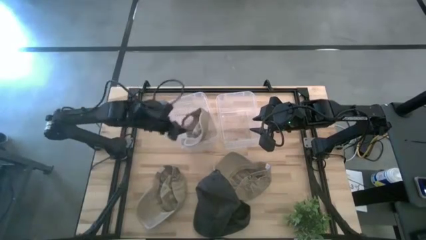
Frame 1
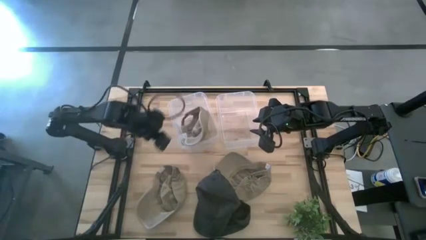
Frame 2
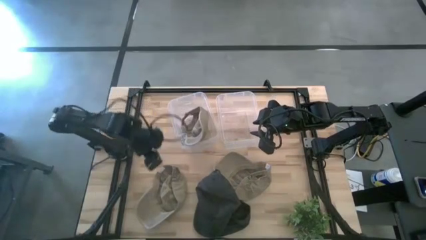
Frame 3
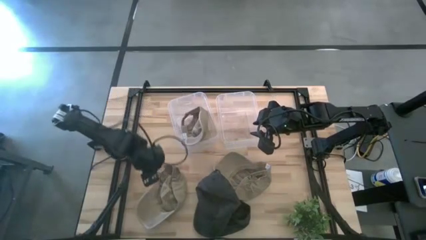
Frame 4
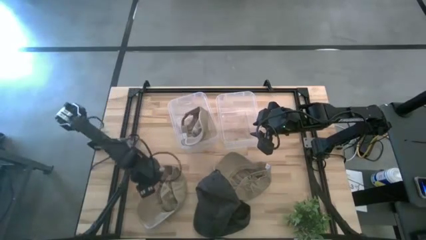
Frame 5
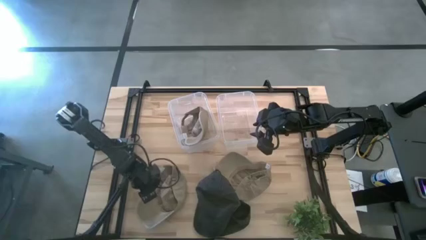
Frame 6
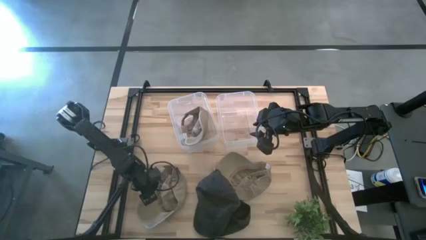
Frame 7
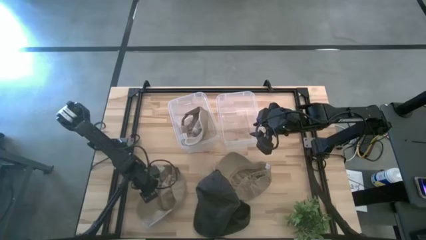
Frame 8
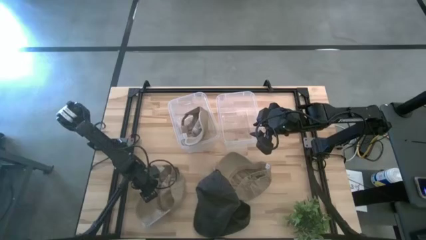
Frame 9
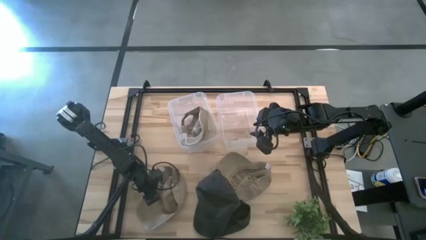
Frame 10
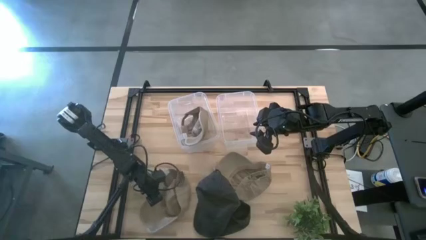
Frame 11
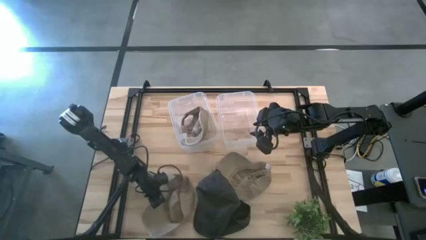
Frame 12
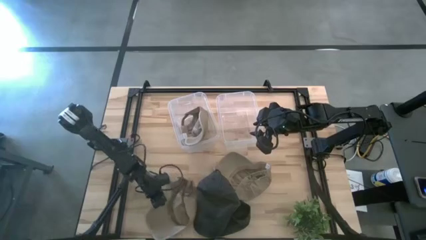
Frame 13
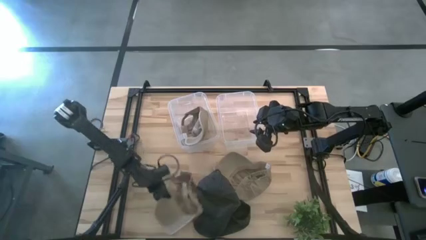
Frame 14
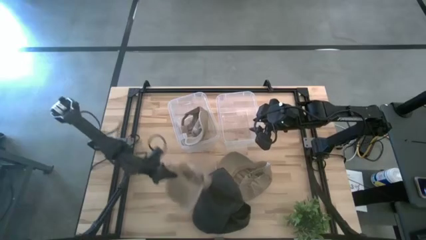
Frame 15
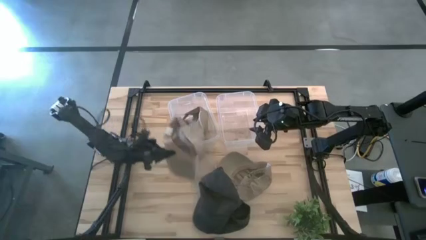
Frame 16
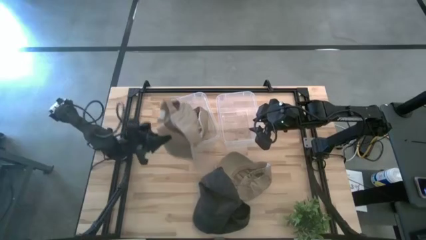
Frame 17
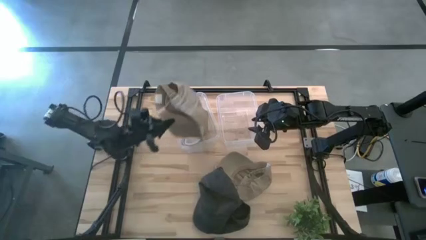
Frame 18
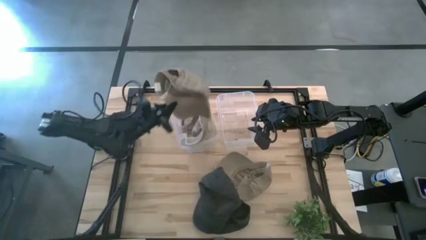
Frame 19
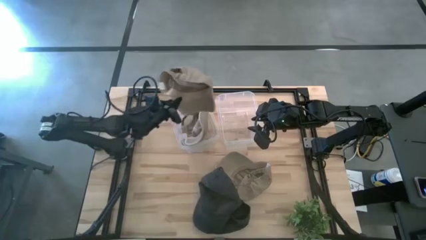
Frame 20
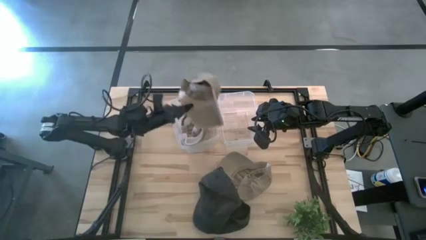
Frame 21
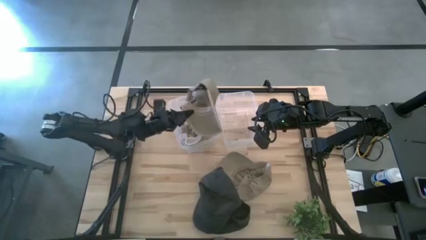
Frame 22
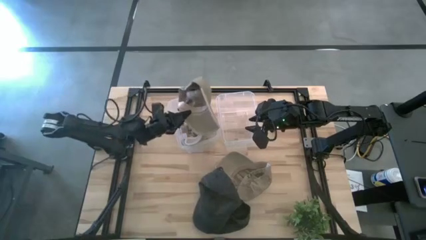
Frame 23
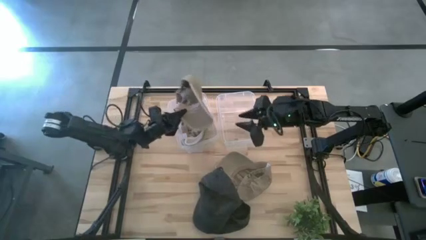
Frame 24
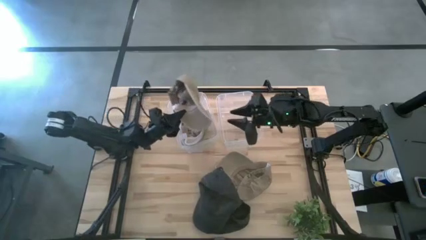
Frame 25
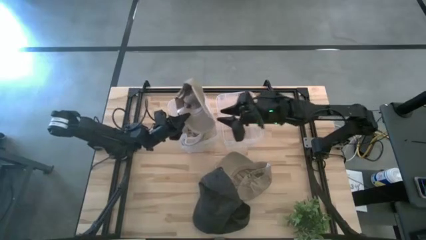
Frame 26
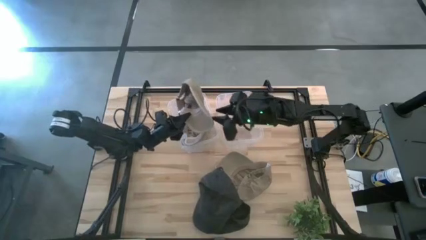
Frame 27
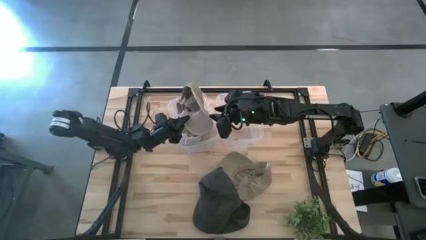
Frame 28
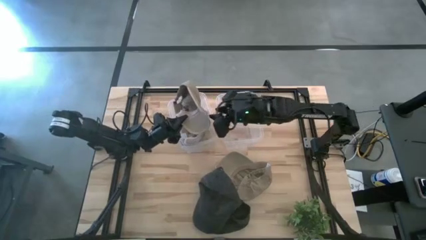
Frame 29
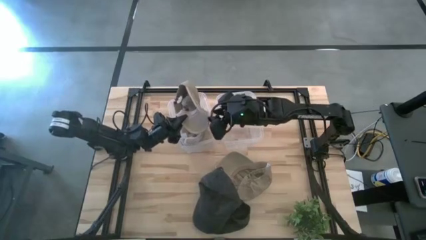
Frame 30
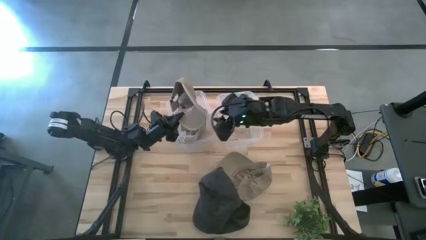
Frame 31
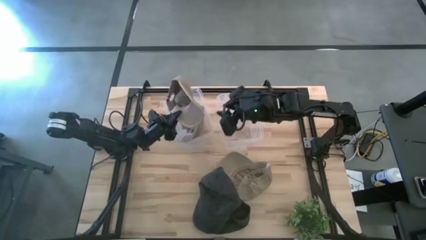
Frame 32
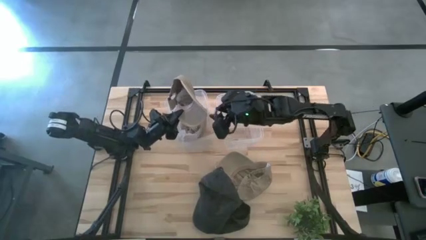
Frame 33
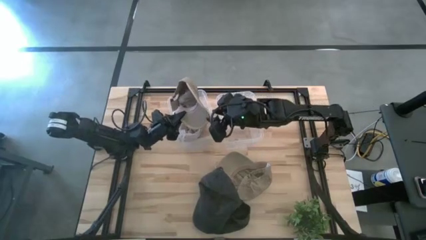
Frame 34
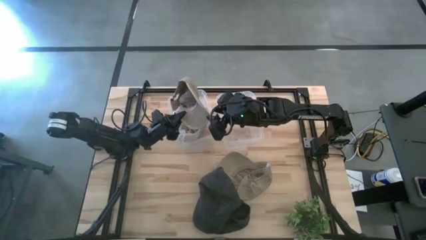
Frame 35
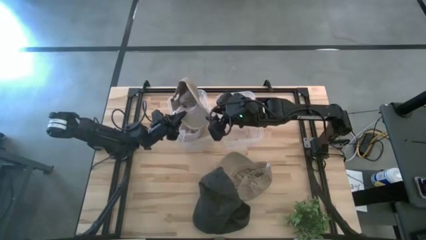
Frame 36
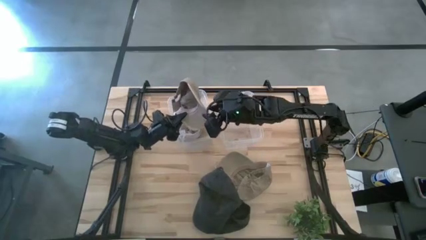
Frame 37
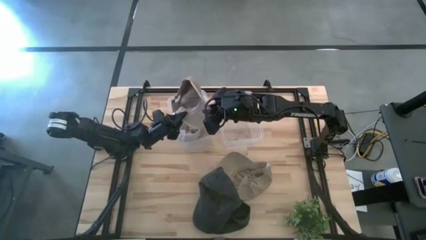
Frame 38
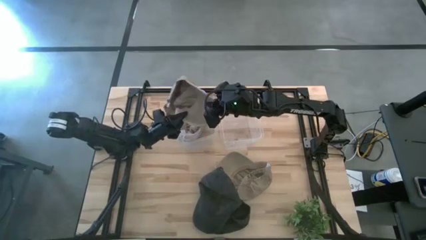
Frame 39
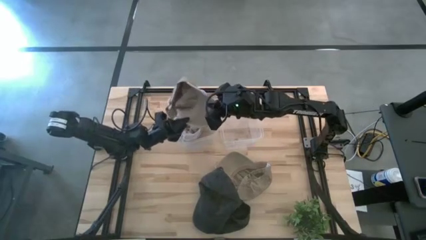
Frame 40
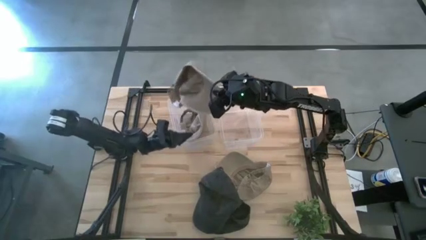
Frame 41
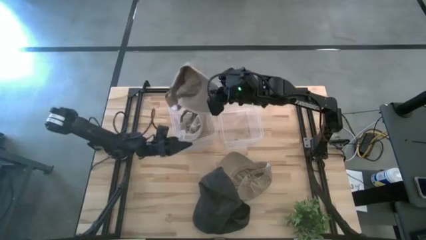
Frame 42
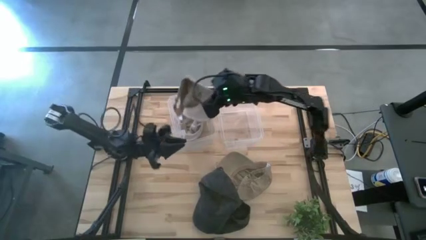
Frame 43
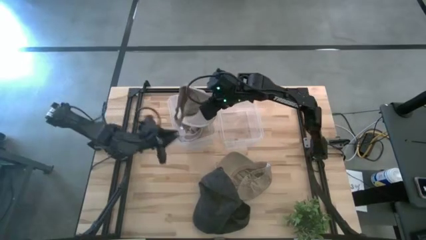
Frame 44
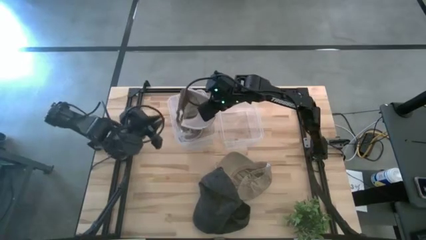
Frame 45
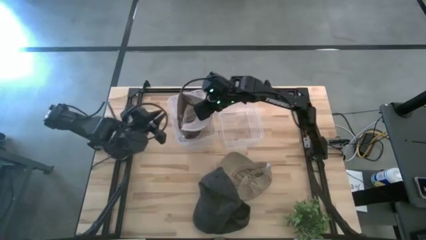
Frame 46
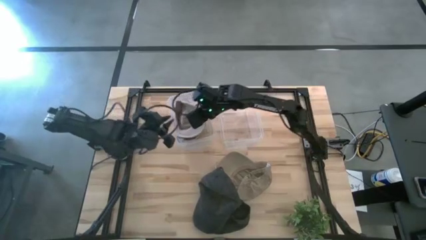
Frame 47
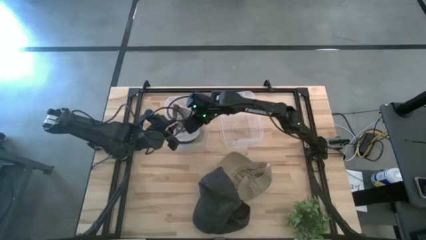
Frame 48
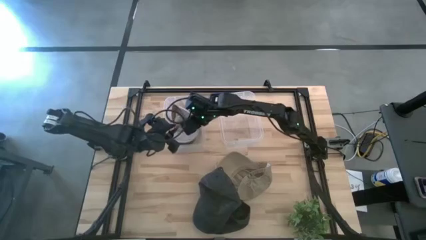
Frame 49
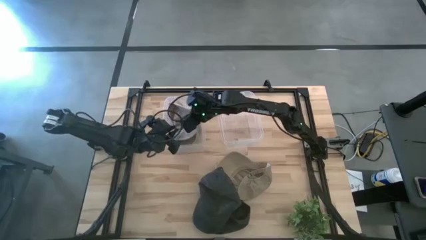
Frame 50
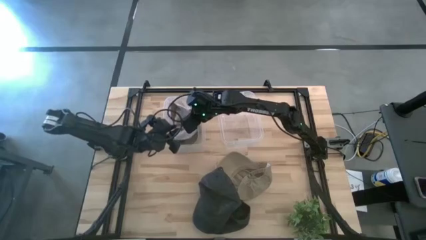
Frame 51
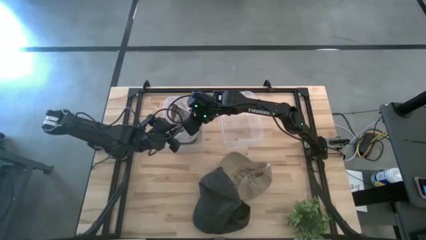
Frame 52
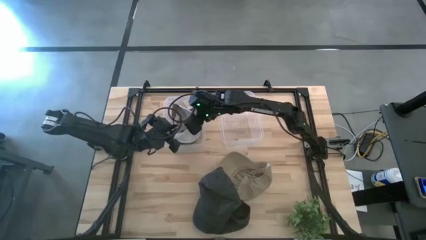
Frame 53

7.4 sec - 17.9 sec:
Task: Pick & Place hat
Put the left brown cap into the left transparent bin

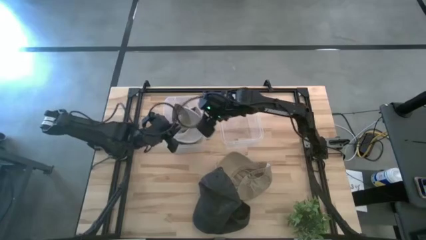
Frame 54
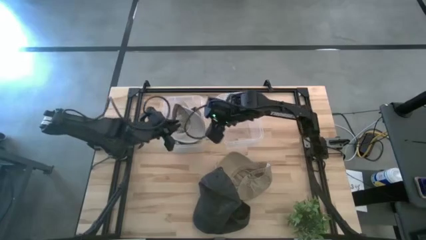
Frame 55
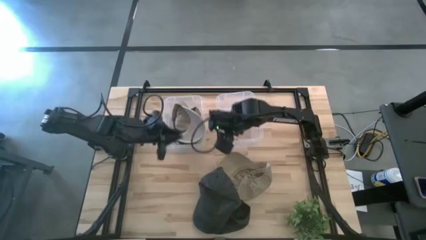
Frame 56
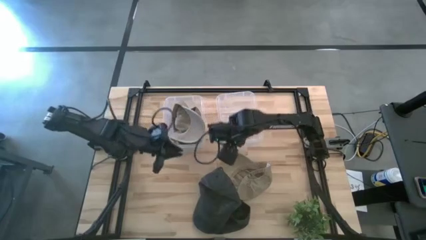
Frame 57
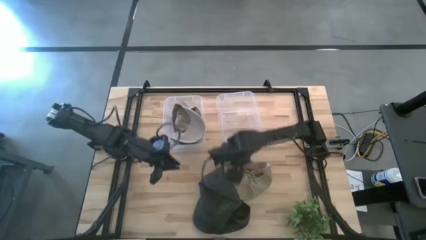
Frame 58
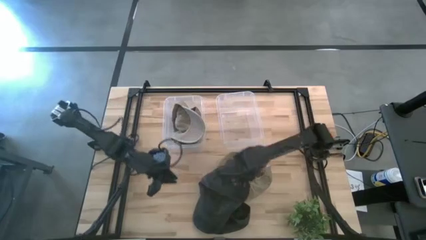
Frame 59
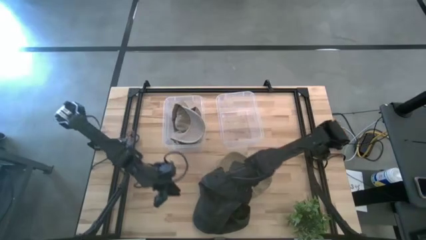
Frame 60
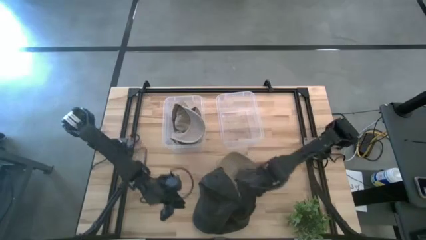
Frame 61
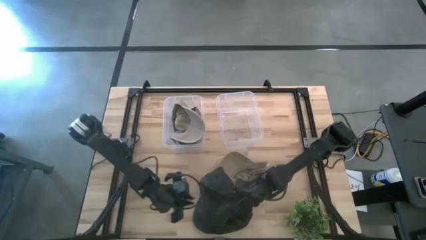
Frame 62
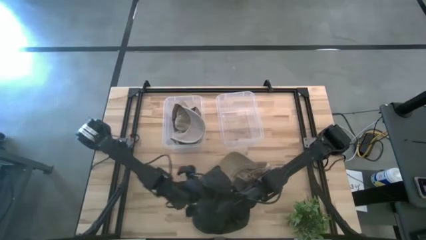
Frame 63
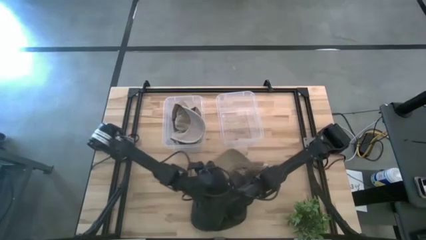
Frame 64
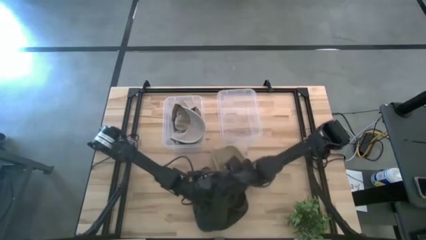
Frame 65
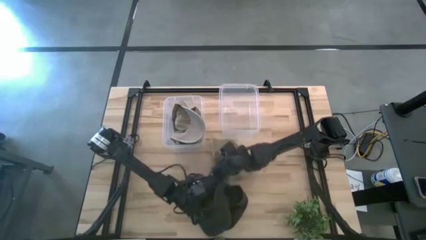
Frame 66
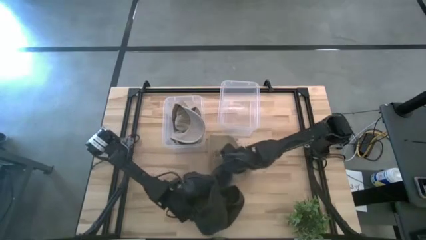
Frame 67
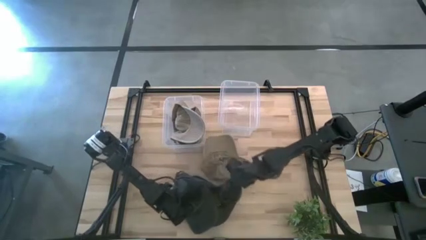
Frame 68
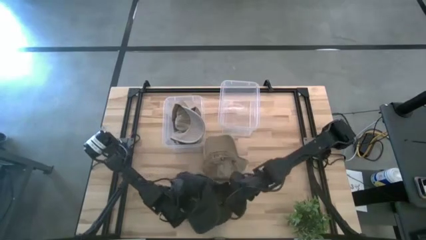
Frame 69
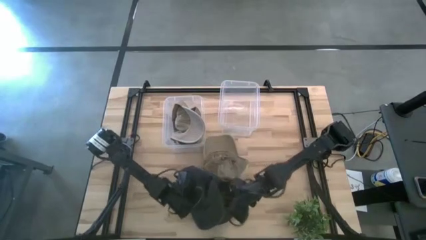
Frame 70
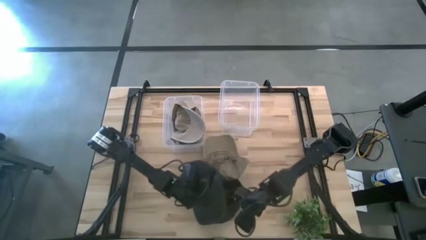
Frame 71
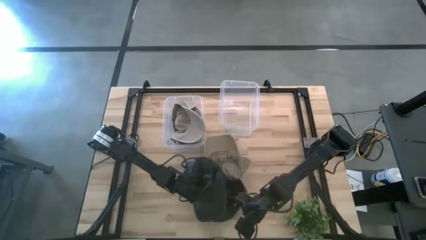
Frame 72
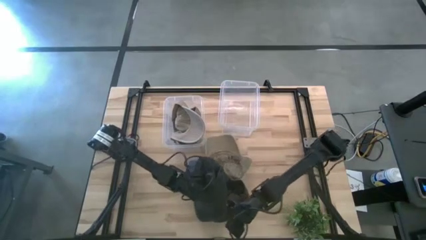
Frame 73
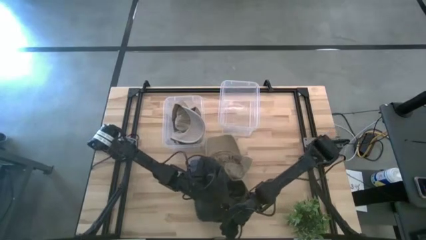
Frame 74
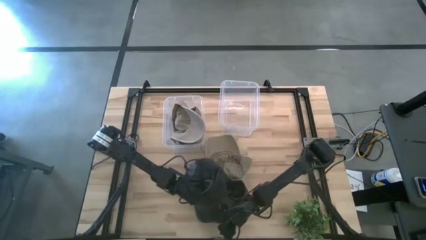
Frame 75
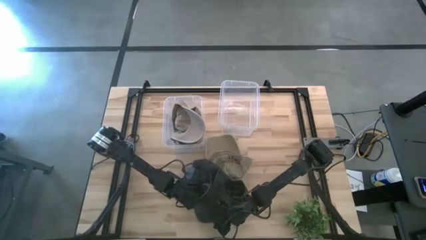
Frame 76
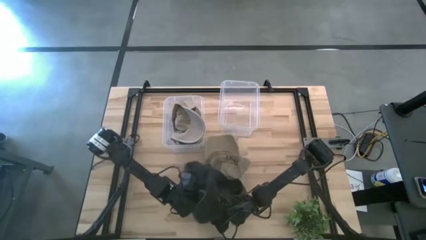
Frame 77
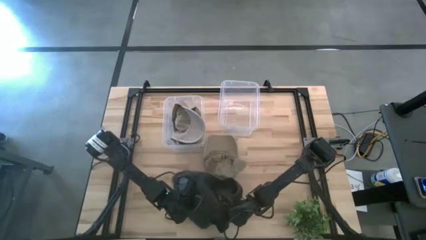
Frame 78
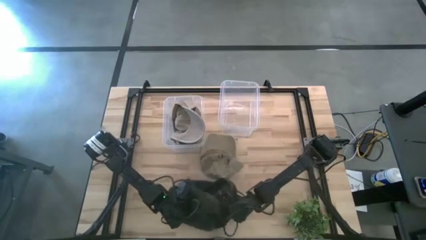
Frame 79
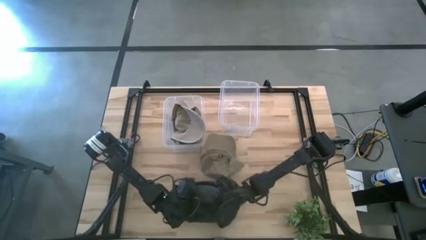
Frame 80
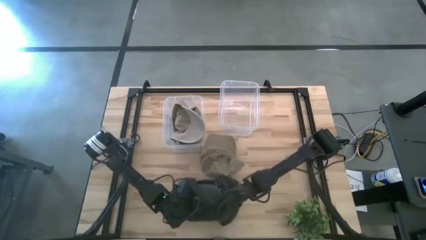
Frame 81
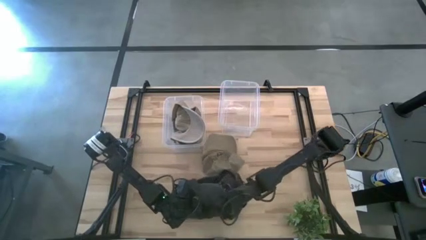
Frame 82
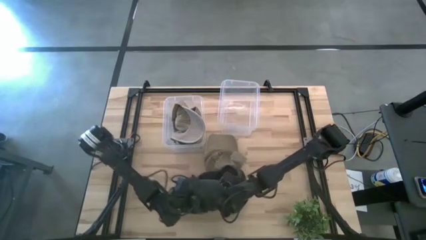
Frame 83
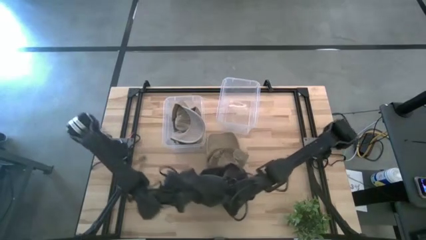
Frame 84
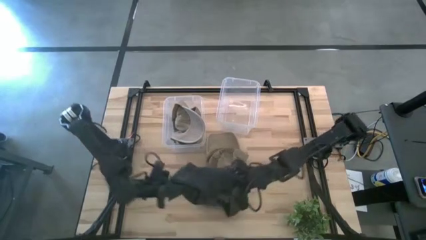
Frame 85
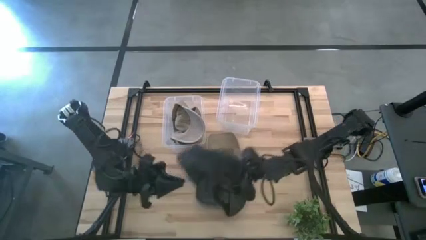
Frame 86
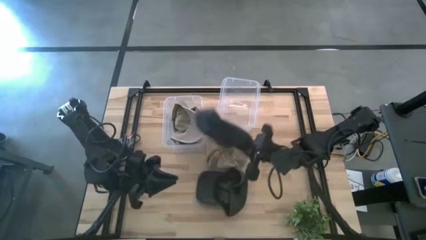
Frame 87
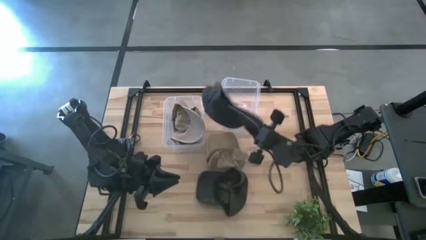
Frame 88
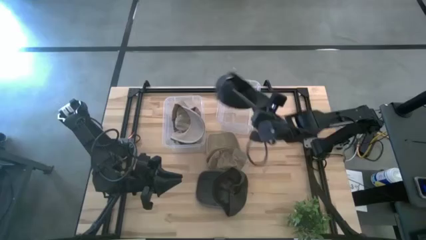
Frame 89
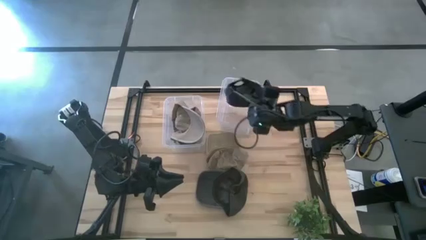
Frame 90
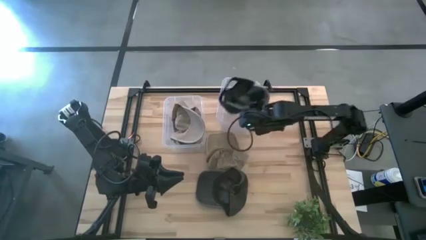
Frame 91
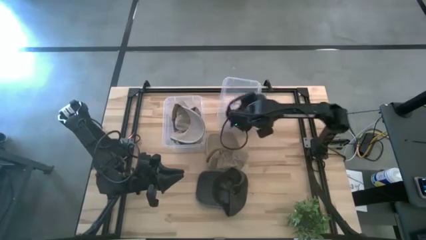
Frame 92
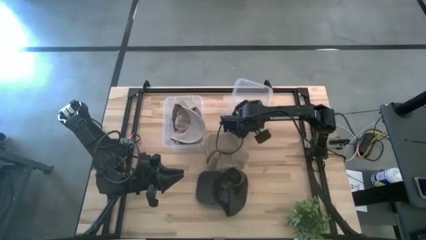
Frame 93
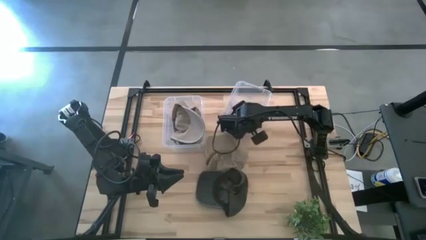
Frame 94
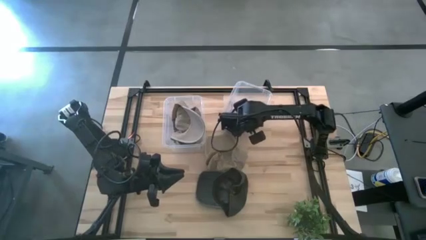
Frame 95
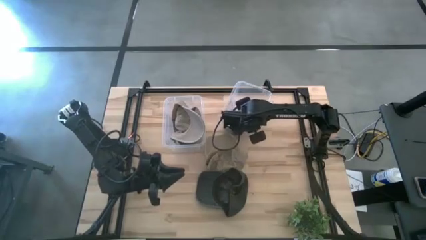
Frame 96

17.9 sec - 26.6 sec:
Put the top blue cap into the right transparent bin
